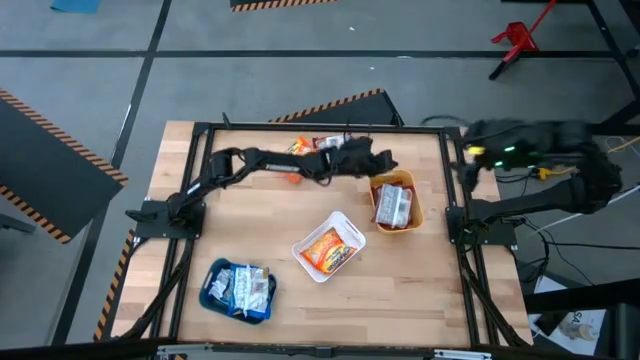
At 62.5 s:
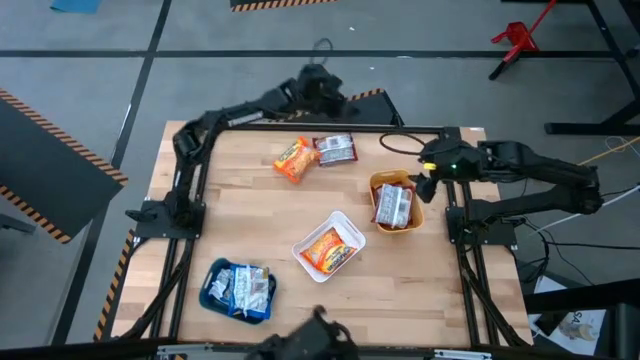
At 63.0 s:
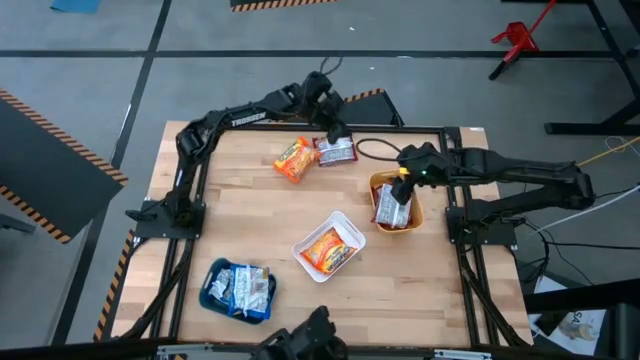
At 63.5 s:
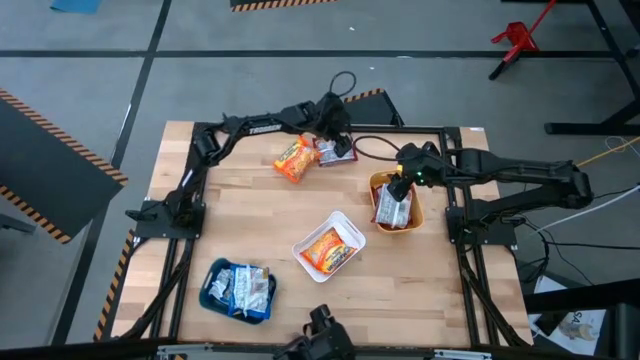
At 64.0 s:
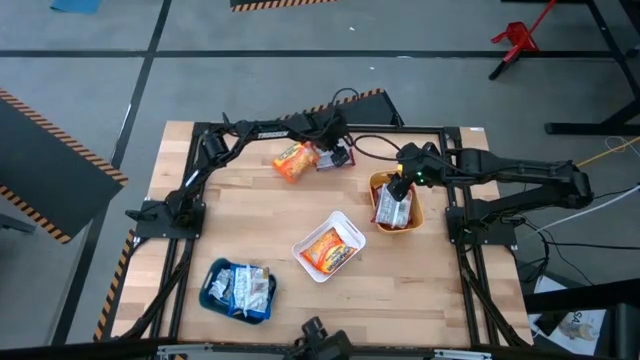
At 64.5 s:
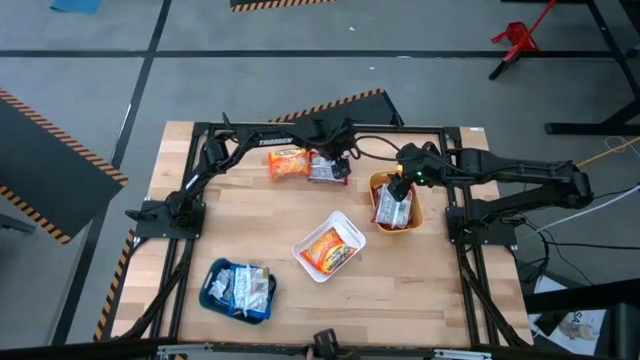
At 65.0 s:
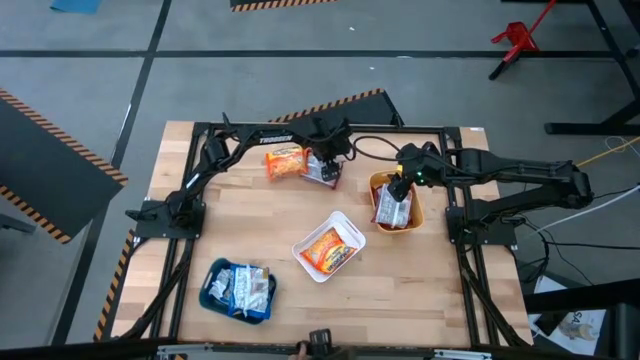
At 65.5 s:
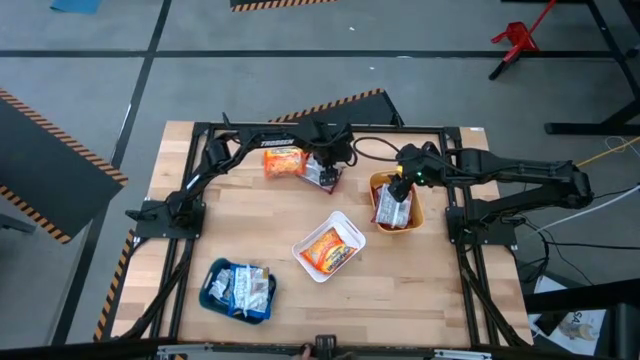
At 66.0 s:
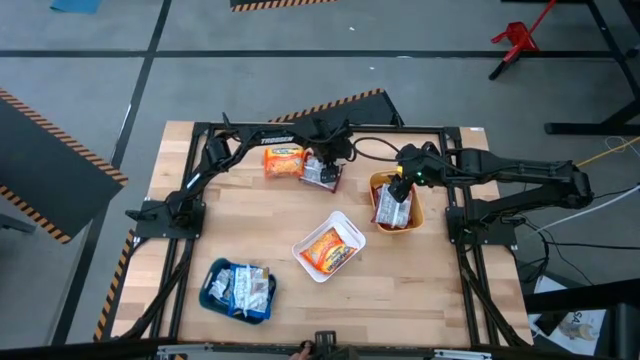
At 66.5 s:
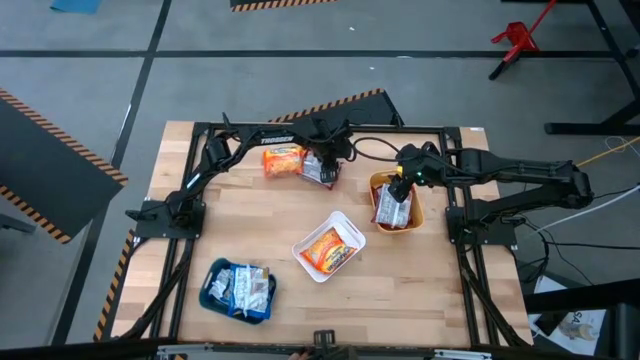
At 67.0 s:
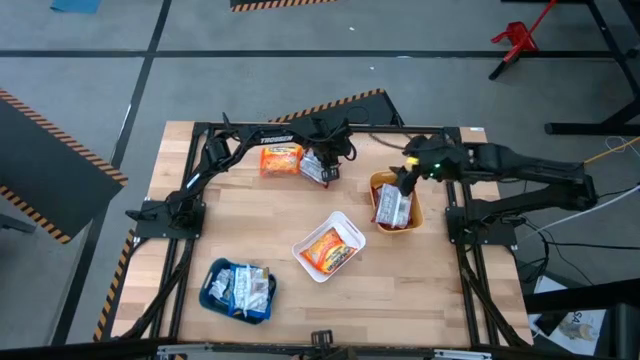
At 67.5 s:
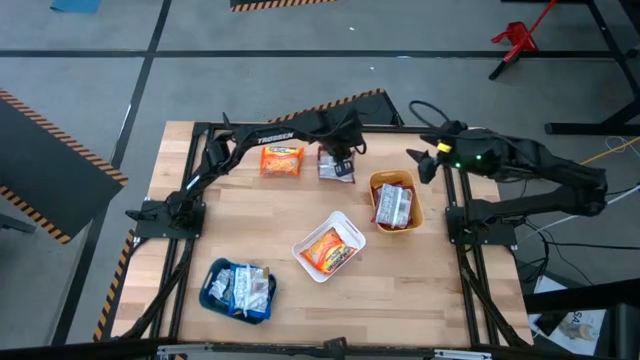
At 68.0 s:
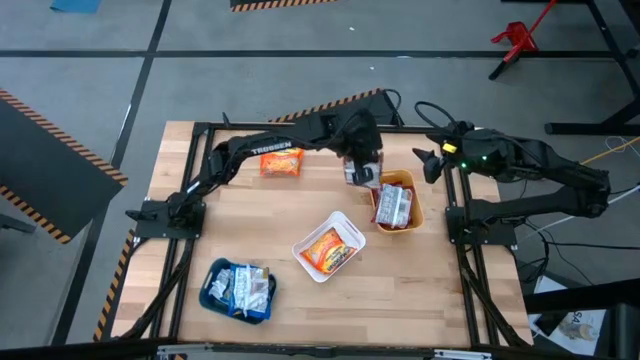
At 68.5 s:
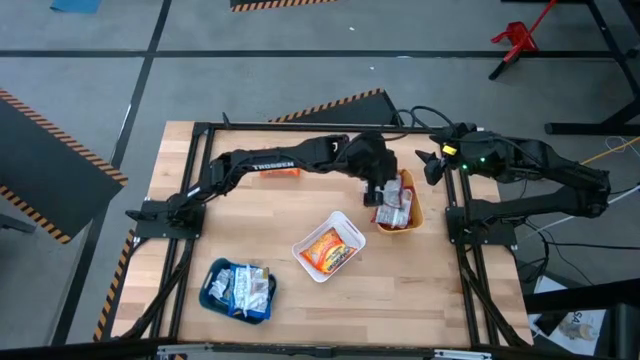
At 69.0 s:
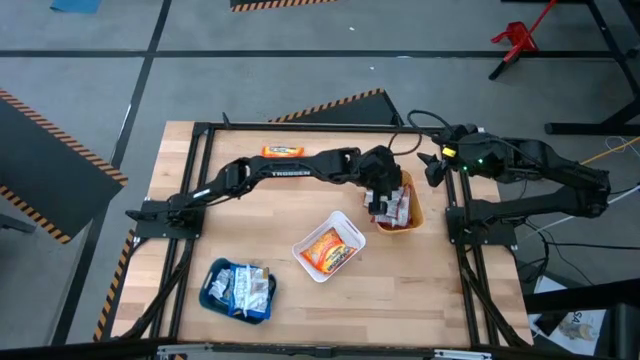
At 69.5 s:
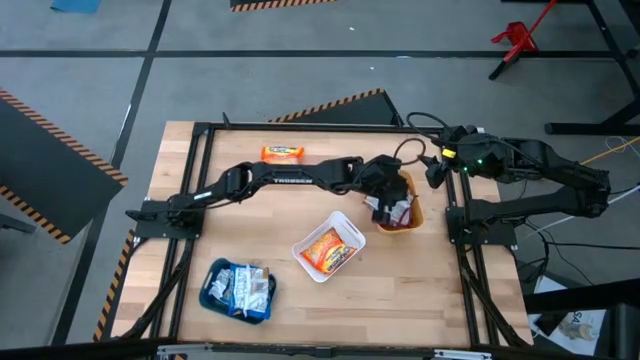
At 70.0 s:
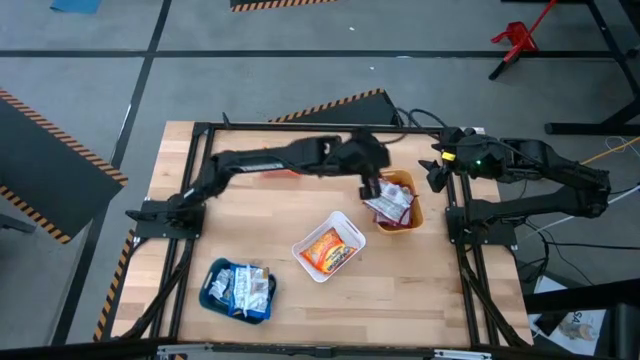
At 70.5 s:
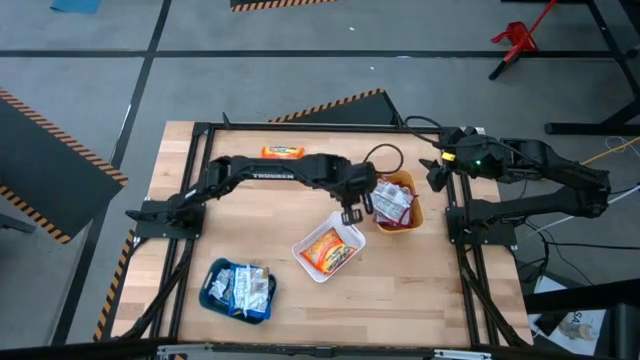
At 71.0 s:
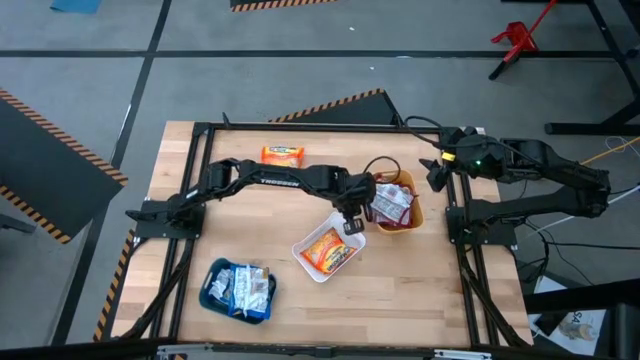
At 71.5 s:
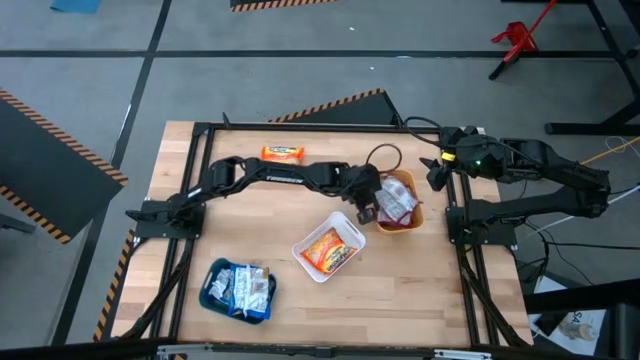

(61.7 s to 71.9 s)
Task: Sort Maruchan noodles
Put the red noodle pack into the yellow bin

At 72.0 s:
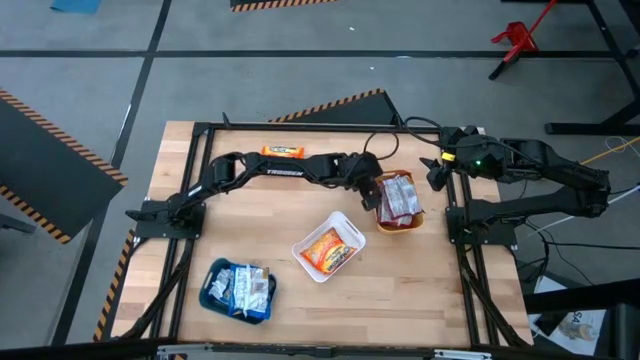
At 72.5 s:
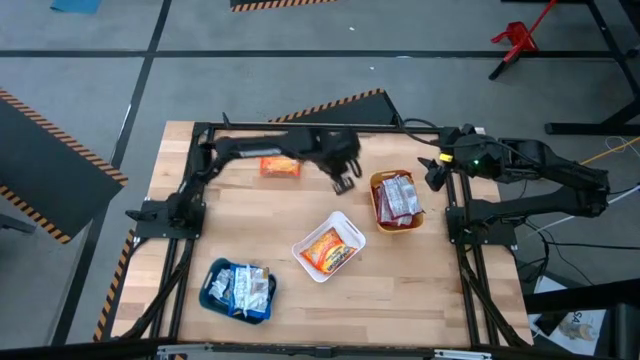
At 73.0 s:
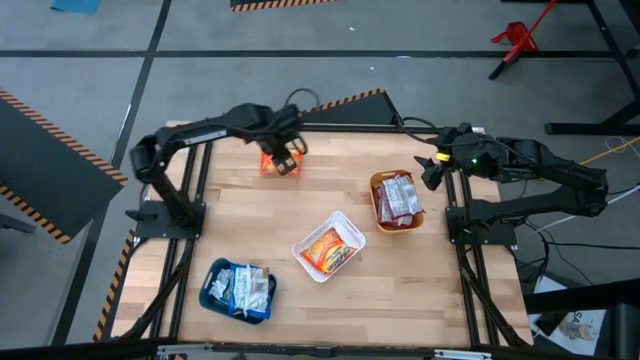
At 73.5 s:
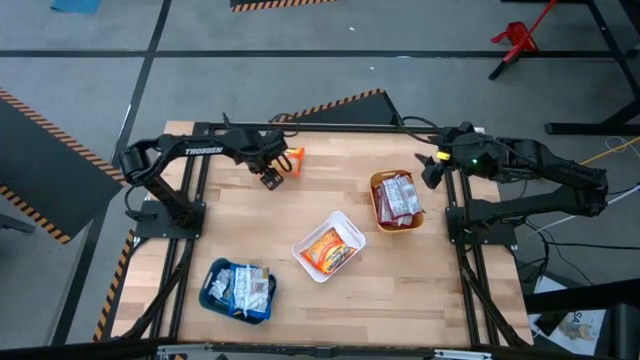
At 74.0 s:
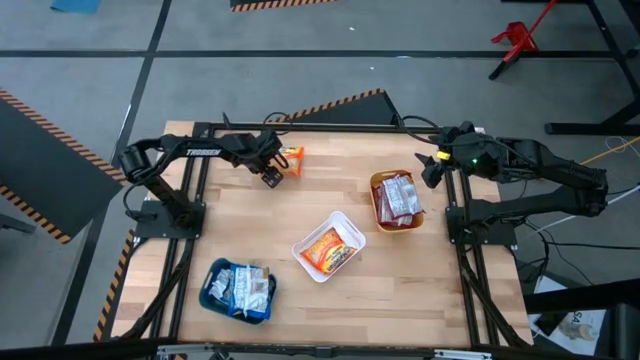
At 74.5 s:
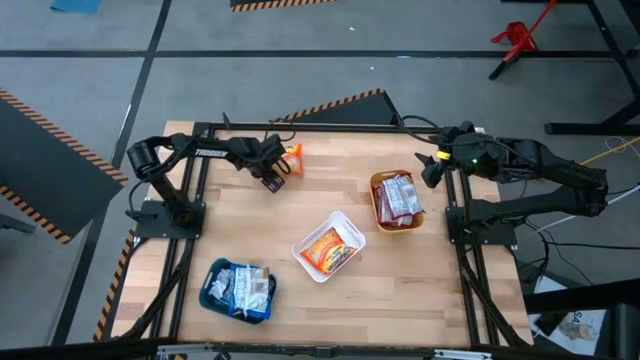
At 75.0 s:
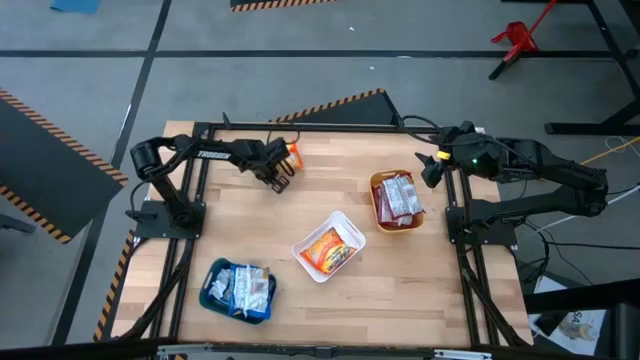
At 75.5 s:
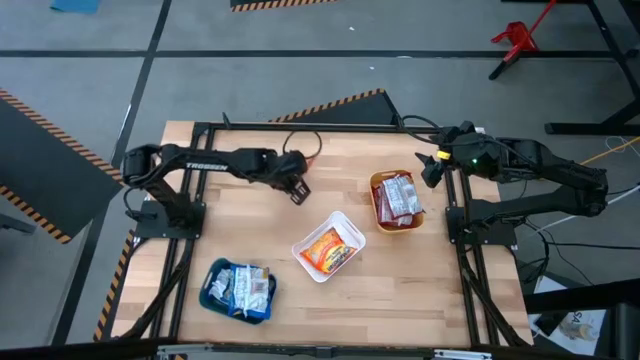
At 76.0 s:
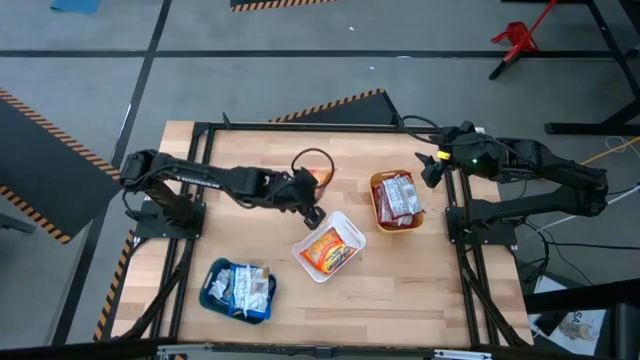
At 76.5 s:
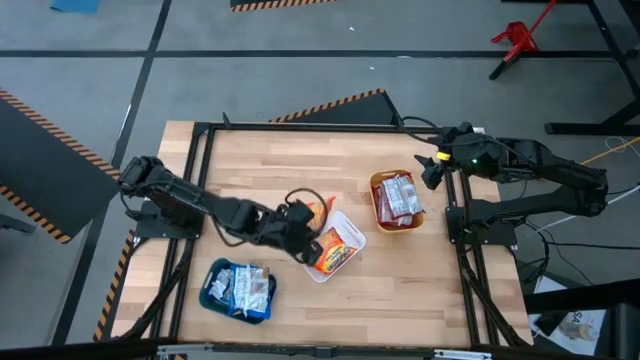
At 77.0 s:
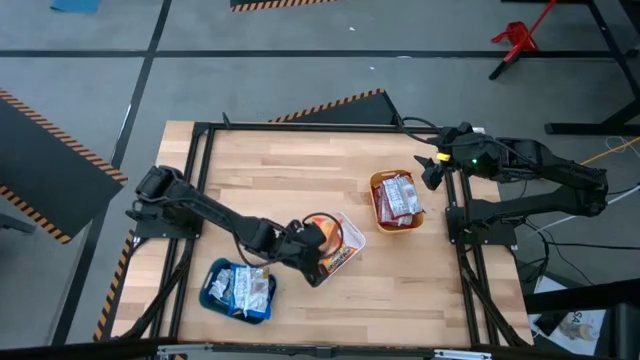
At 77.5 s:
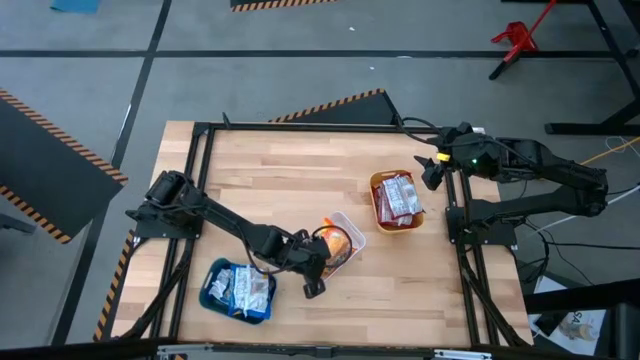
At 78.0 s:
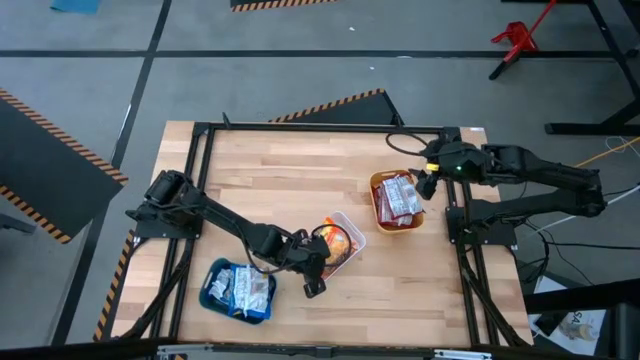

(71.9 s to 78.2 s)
Put the orange noodle pack into the white bin

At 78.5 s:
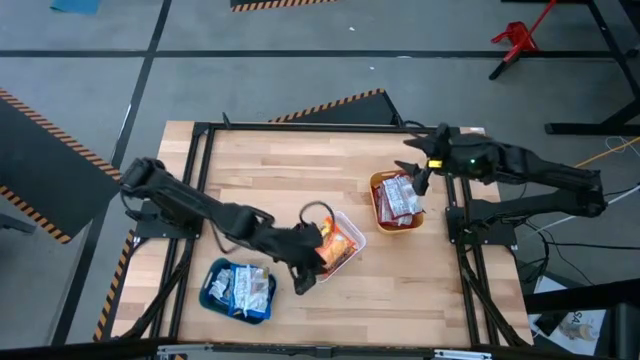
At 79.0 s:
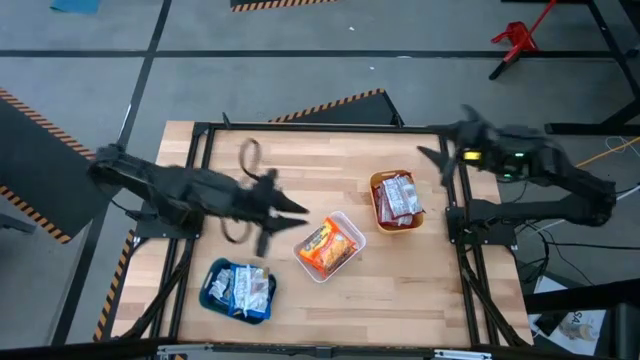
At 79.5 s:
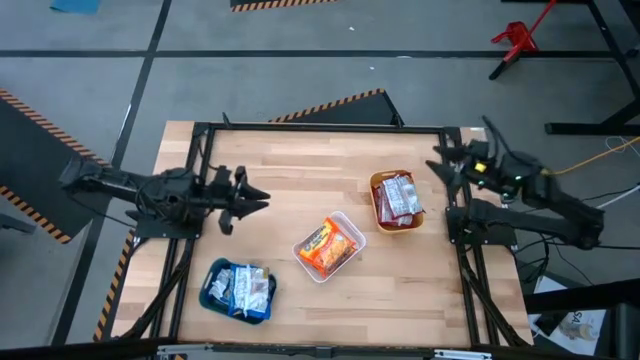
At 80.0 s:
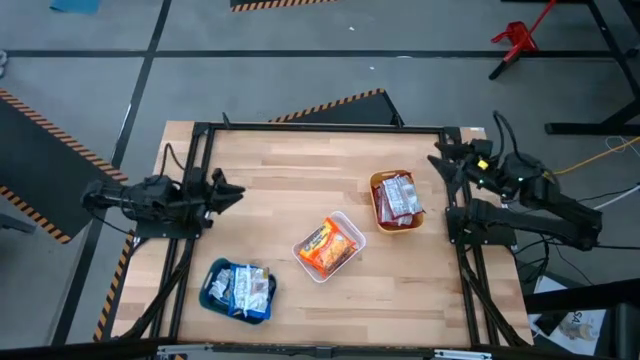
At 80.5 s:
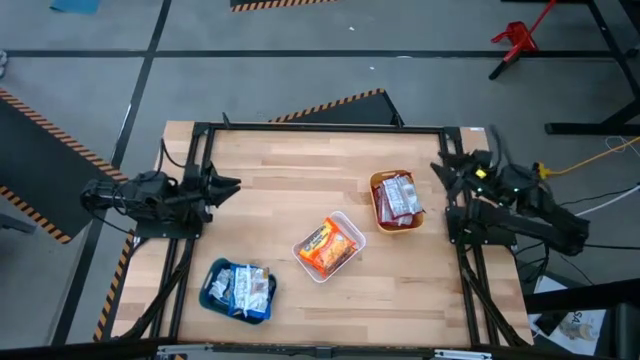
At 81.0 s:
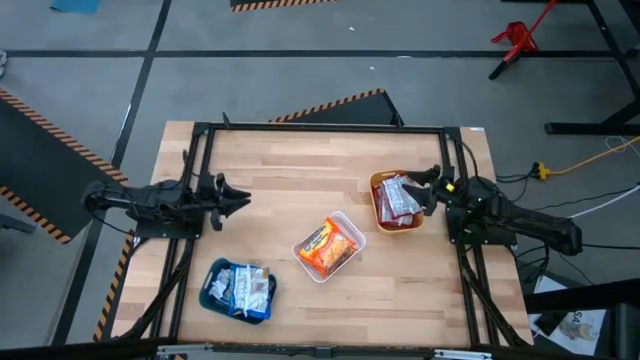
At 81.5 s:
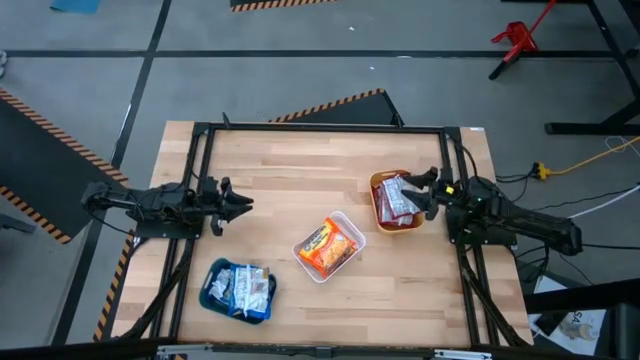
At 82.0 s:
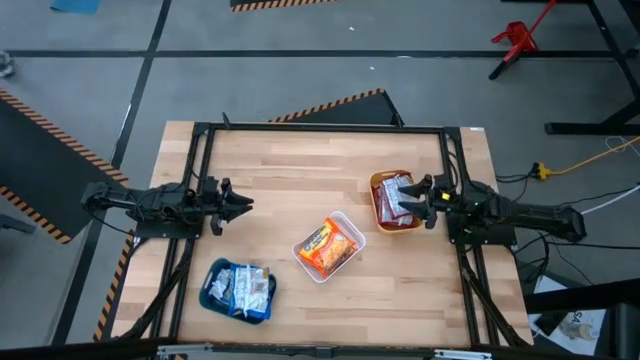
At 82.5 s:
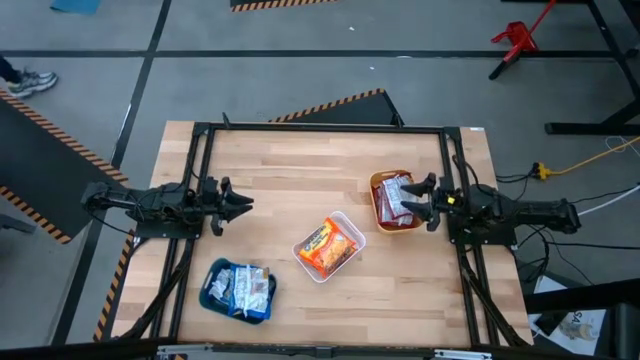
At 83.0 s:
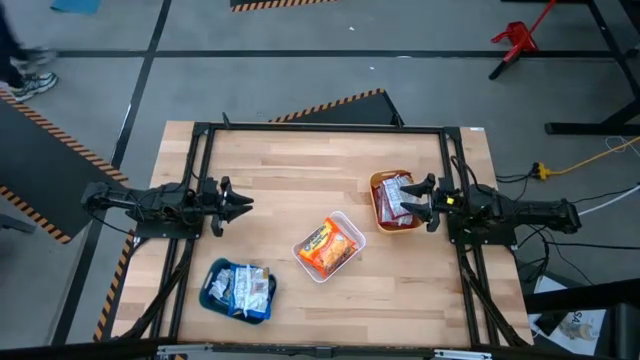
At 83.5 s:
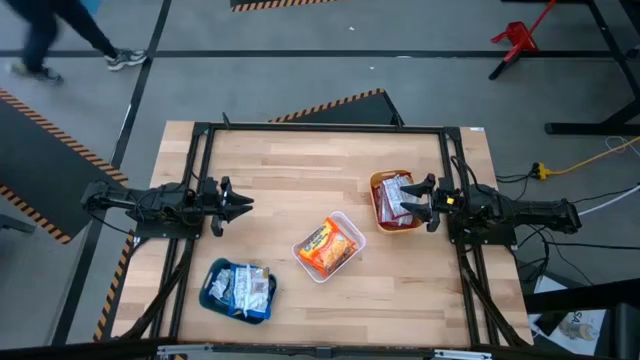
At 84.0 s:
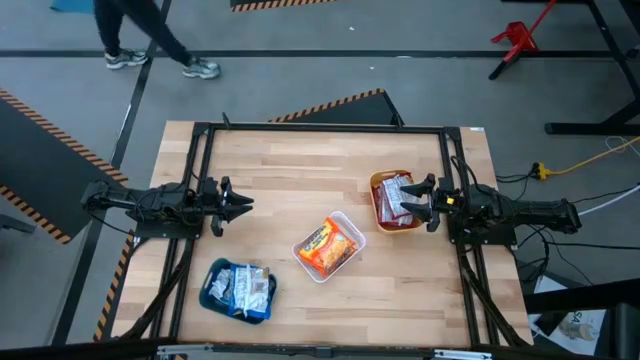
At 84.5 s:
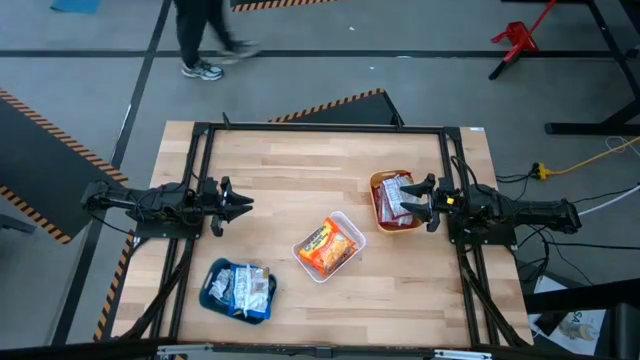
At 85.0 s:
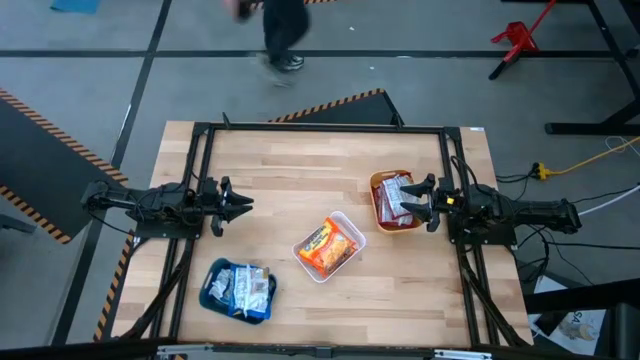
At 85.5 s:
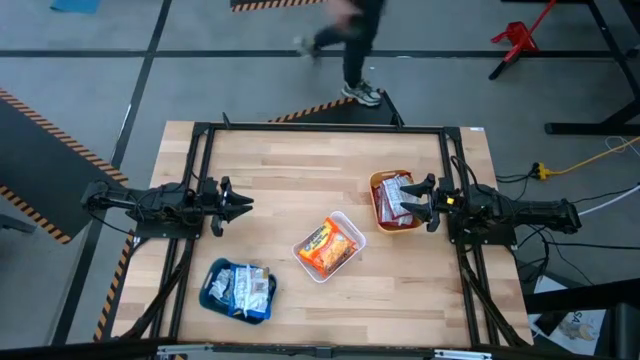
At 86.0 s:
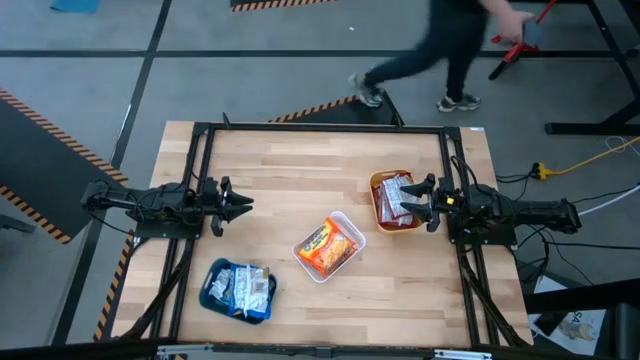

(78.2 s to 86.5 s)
Return to Home Position
